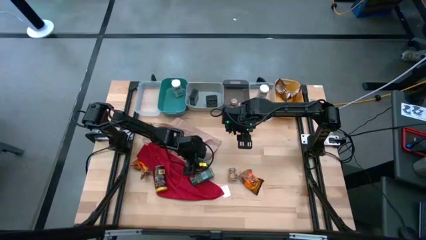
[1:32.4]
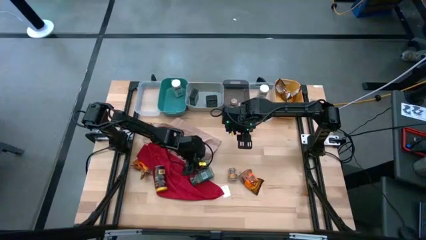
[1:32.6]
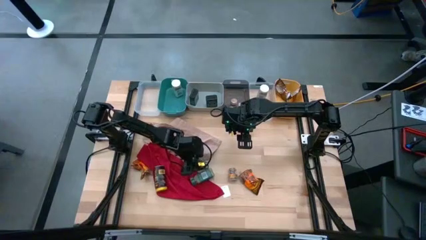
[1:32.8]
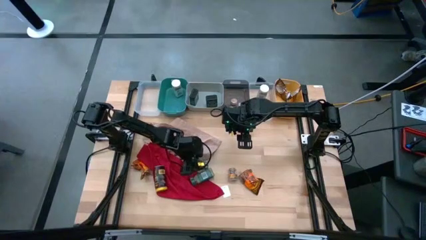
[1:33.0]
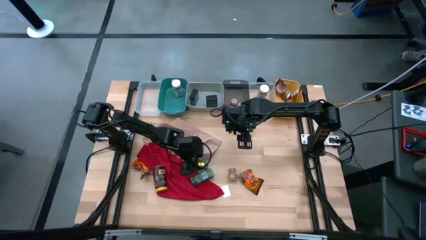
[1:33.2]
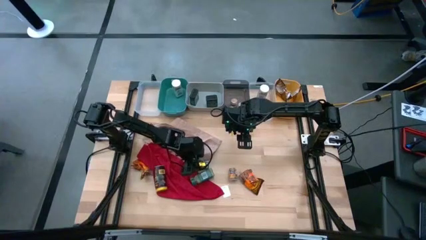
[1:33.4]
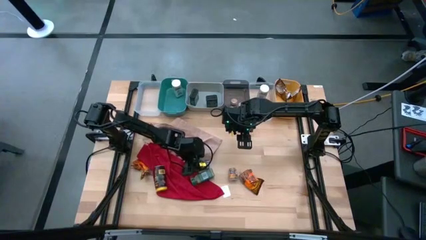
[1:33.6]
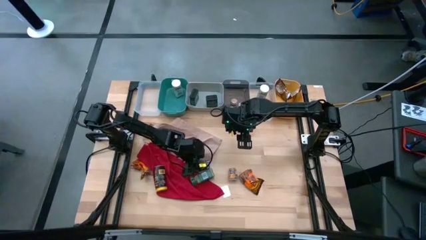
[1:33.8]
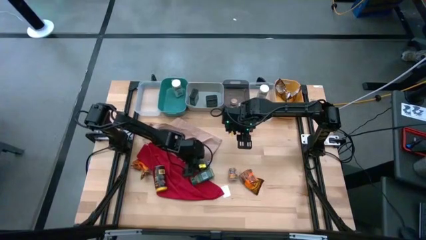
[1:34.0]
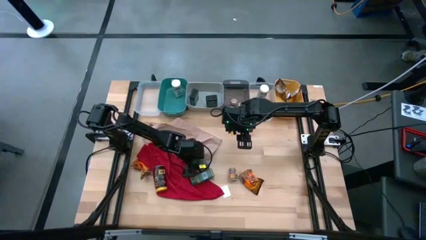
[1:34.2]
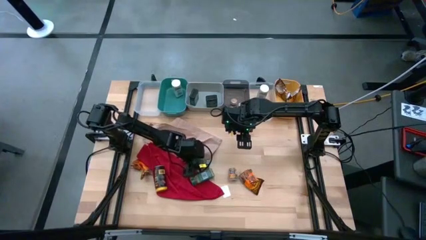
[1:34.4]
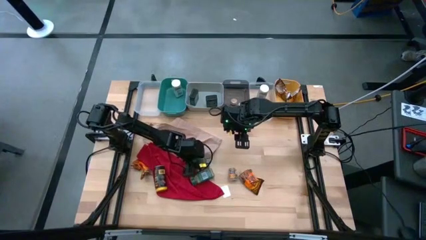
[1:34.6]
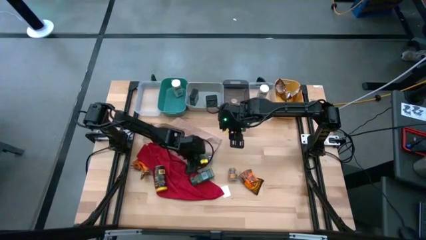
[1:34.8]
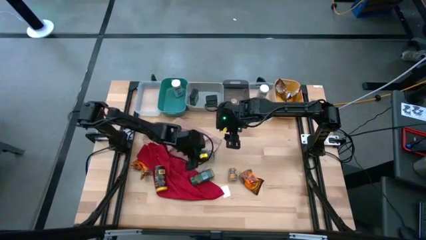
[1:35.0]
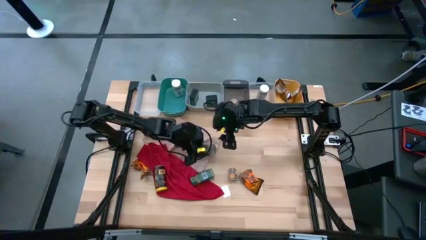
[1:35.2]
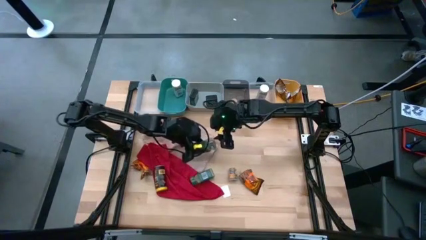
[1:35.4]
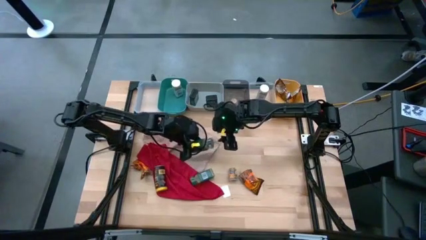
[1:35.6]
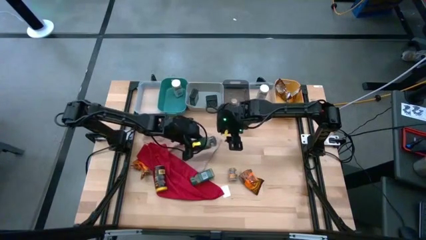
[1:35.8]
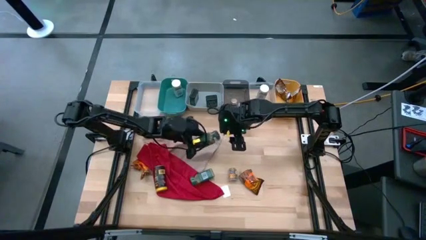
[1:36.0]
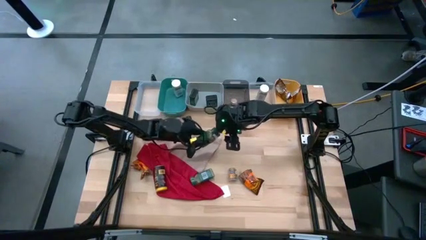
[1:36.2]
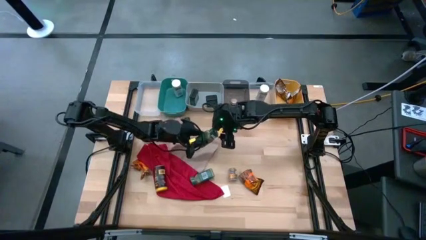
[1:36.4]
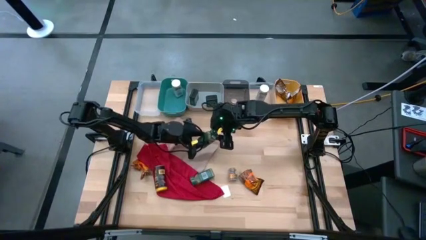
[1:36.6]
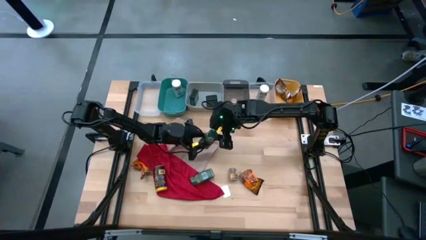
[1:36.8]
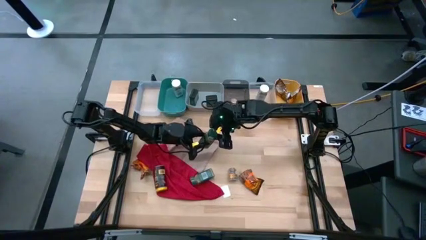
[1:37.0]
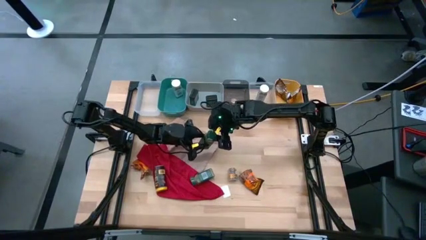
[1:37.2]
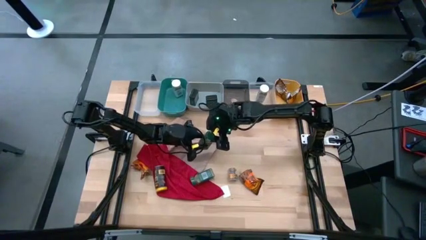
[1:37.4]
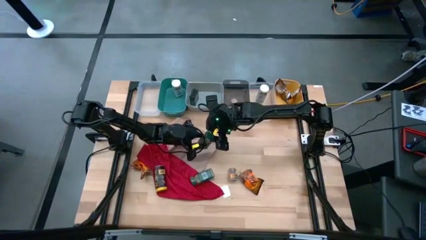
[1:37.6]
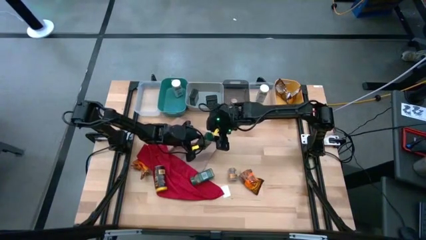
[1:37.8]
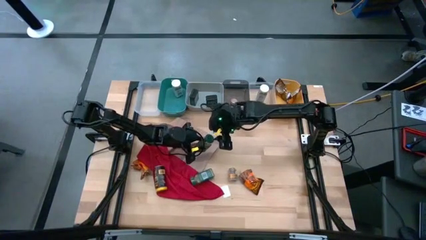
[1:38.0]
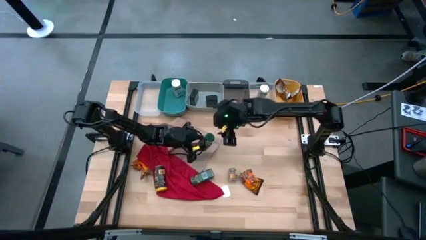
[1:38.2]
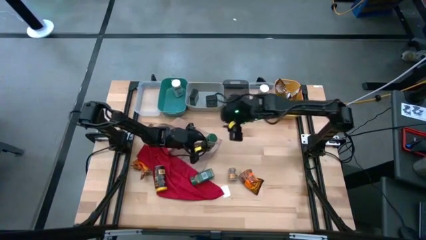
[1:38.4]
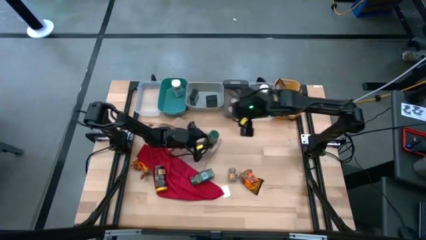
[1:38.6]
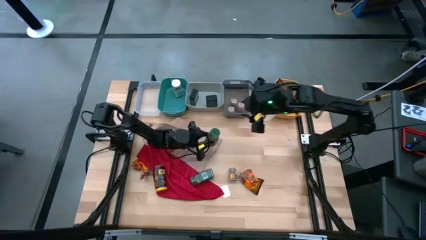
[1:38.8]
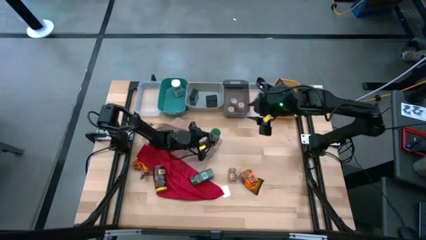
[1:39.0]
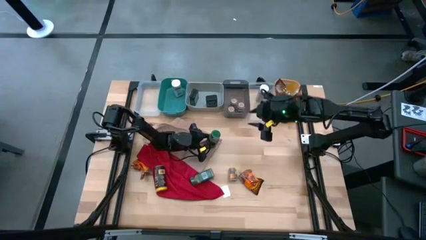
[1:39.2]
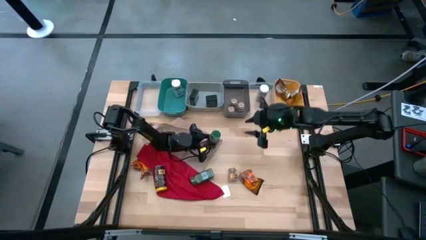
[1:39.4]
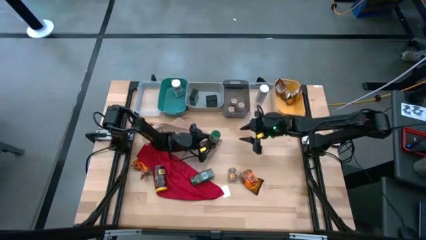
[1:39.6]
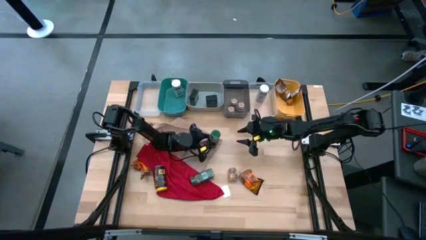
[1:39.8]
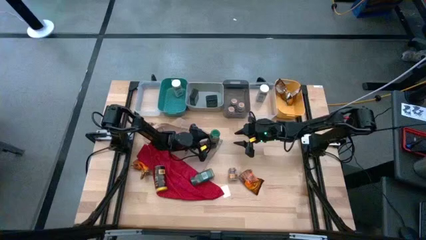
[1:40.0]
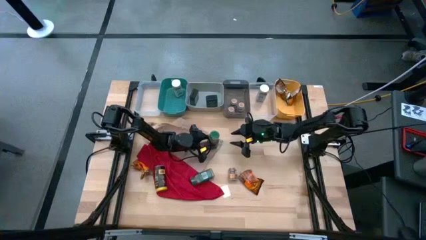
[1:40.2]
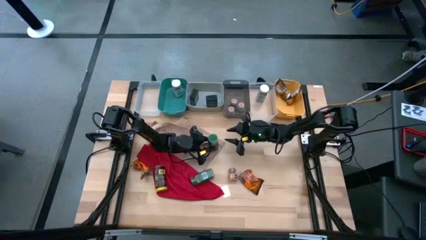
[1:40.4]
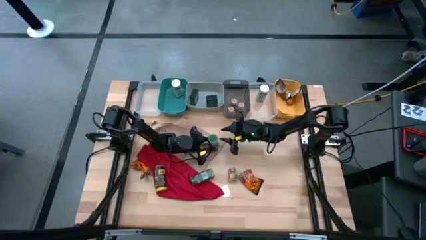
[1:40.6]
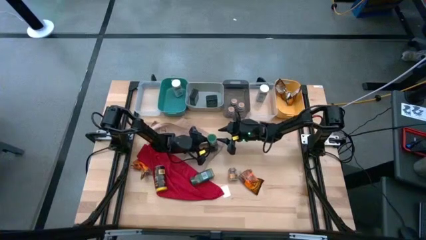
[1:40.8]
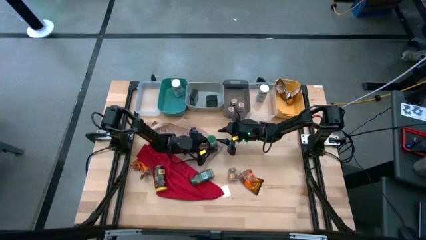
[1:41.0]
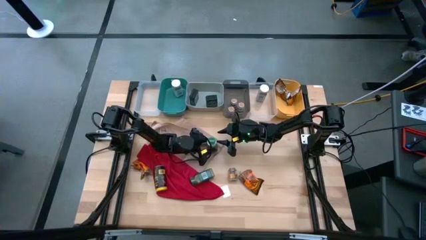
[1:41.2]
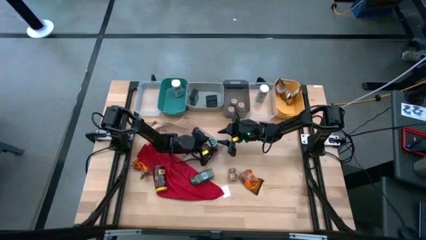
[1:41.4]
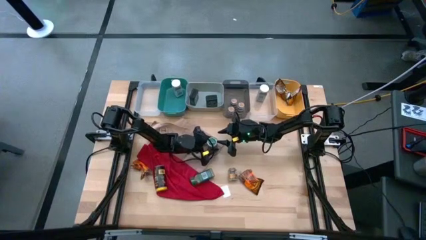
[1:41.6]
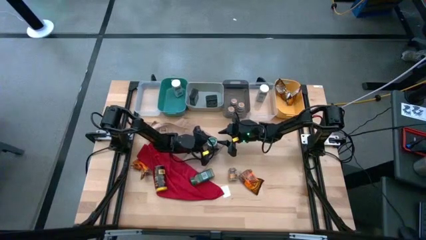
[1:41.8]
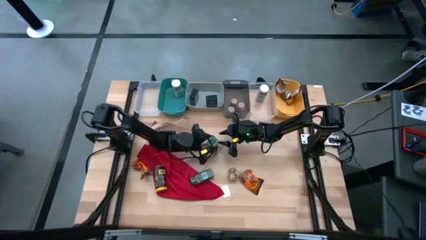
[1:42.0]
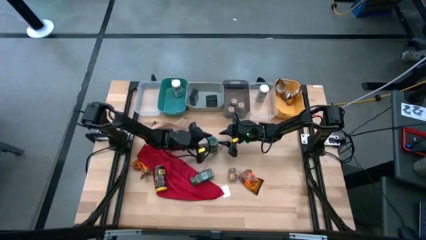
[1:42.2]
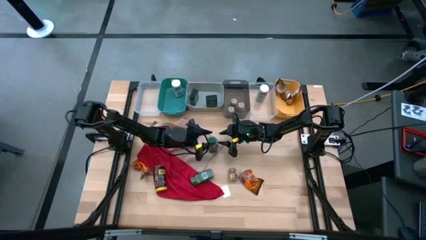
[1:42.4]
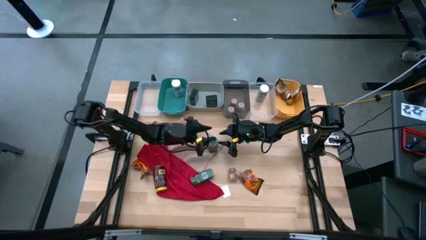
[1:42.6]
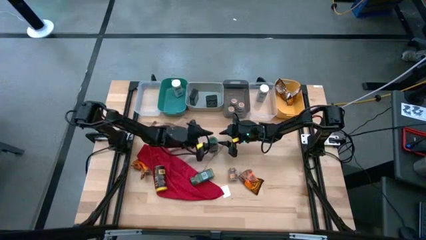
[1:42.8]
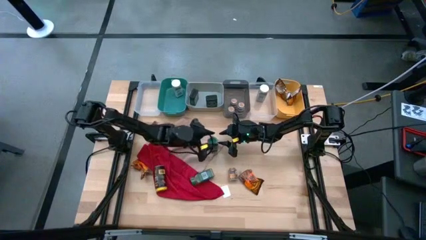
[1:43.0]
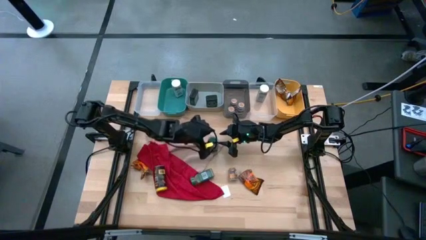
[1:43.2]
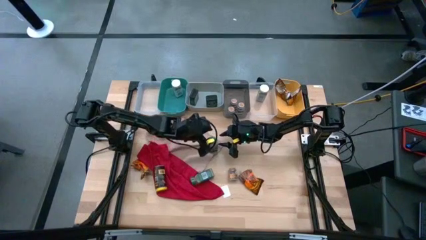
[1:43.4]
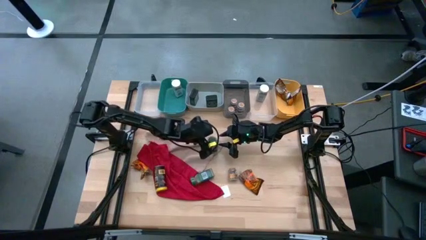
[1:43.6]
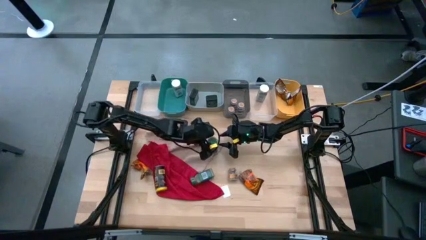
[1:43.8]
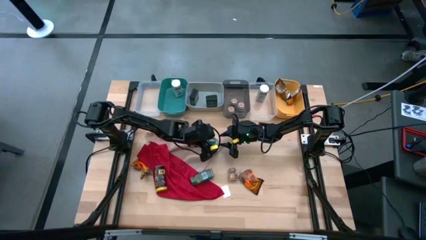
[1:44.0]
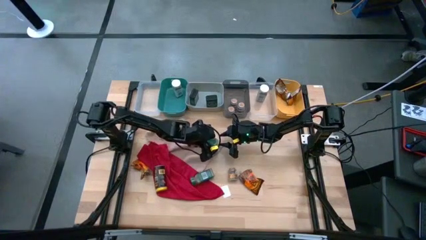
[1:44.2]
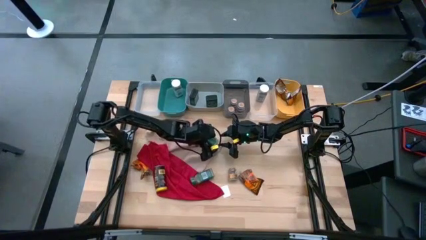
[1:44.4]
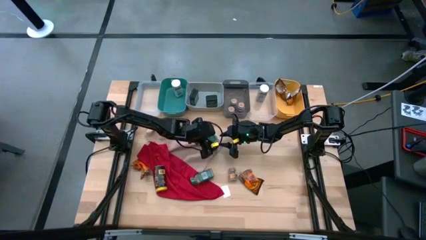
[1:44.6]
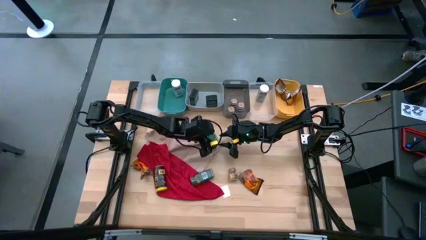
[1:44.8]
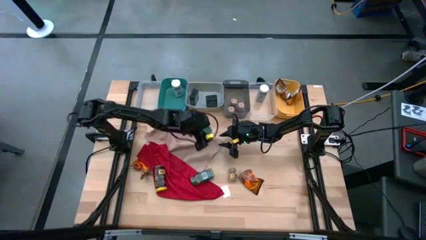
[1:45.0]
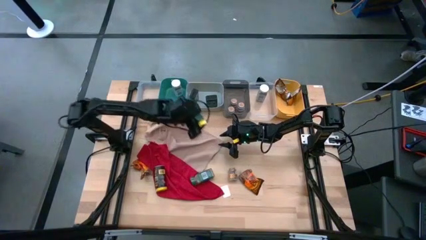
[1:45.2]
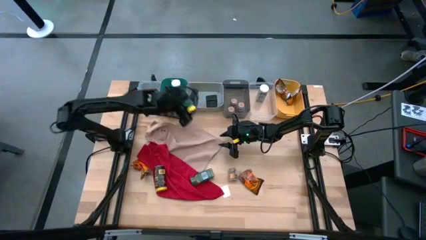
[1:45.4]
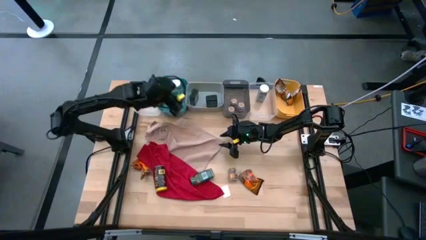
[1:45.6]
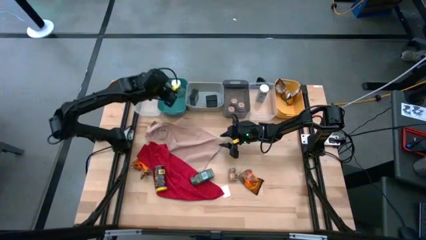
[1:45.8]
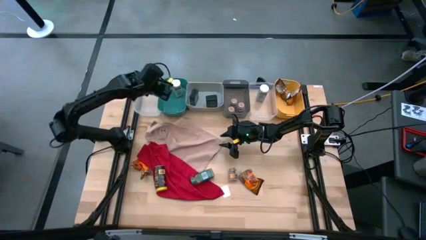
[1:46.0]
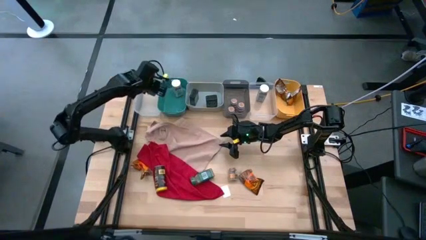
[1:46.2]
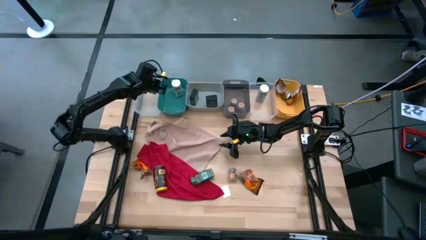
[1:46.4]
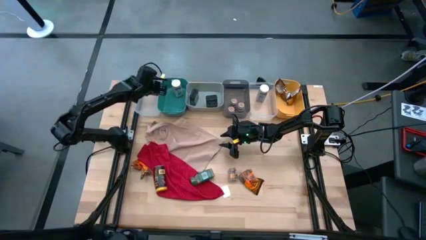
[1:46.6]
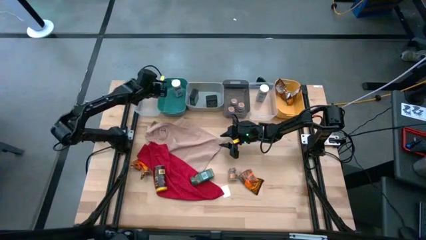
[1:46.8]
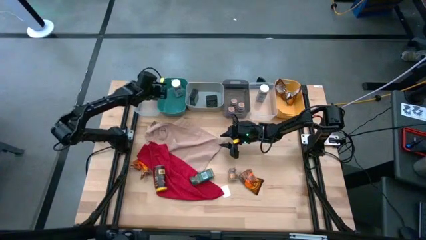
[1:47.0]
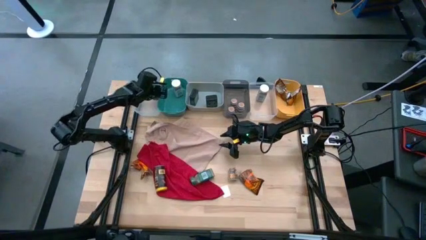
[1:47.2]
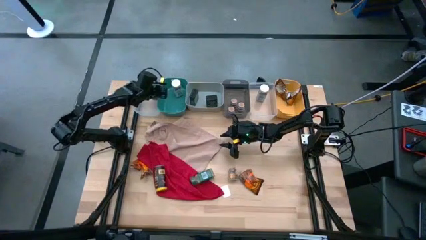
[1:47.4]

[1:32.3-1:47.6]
Task: Sort spices by type
Put the green seasoning bottle into the blue transparent bin

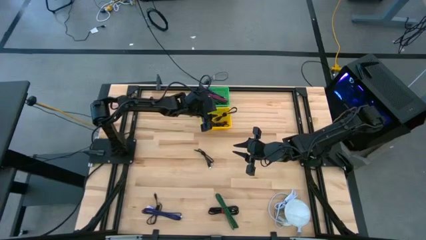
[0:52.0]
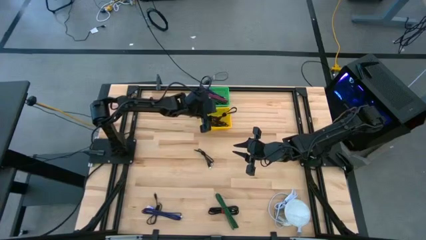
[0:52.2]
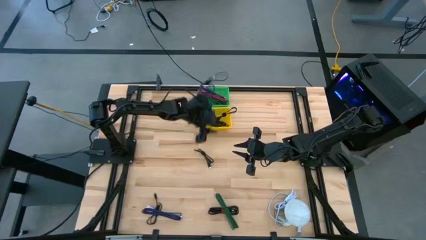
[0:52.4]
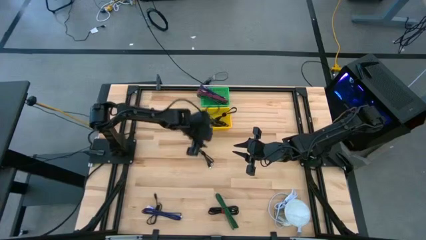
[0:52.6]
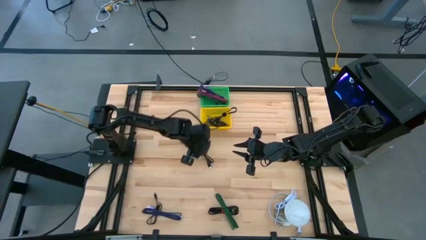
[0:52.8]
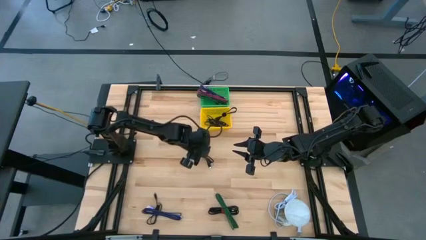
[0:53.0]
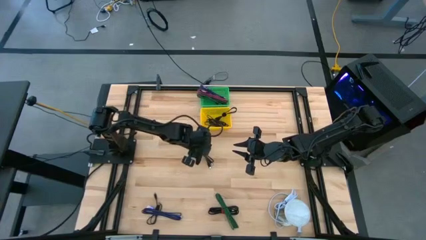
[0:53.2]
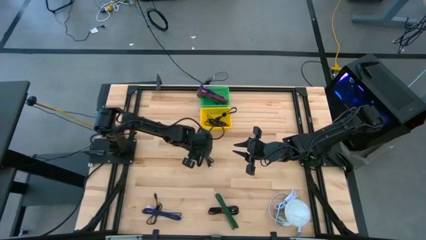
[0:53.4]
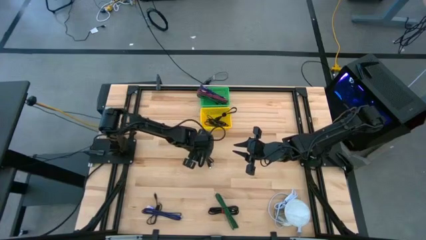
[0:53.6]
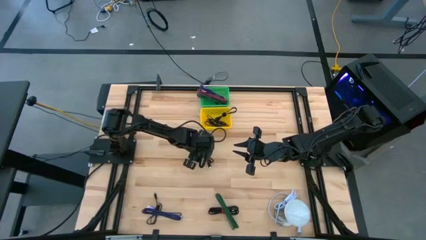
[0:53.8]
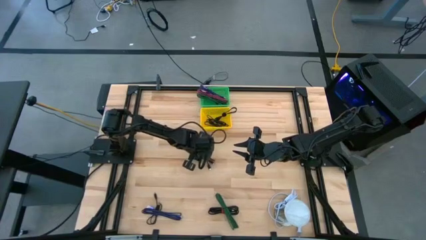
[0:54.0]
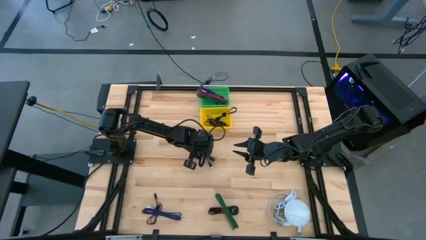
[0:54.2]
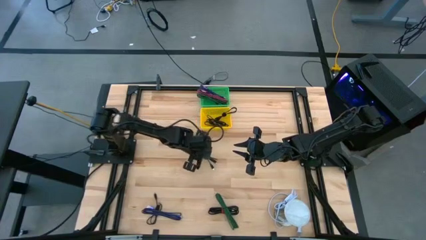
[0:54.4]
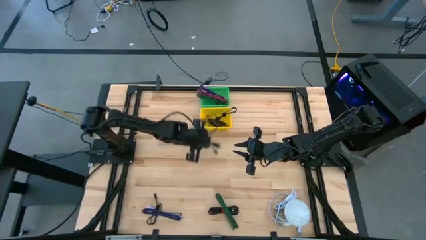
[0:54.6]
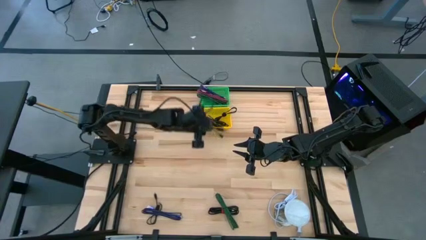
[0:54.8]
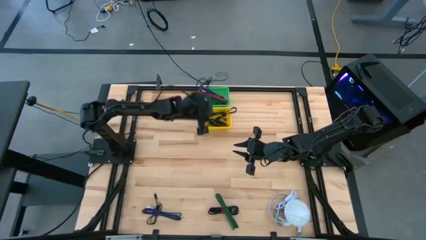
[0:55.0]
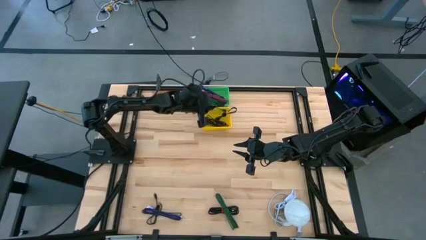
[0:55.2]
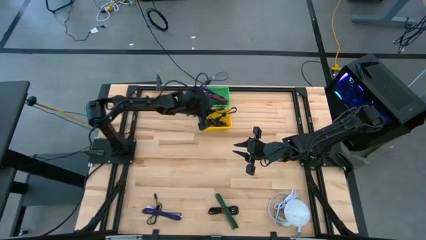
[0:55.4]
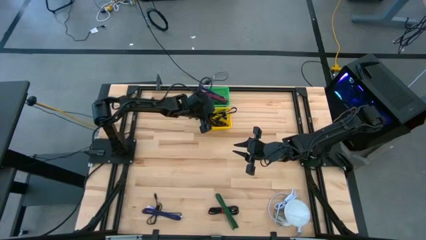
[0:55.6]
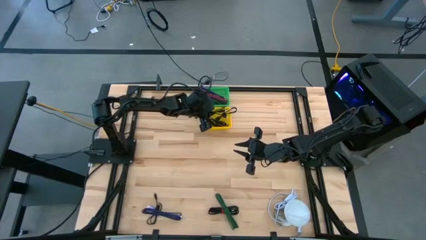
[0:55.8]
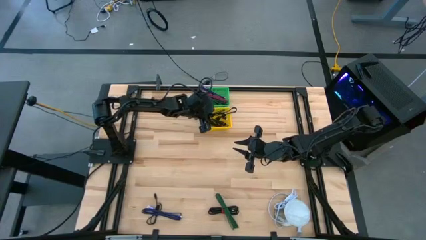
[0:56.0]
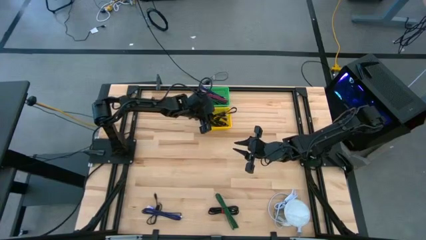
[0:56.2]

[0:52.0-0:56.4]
Task: Pick & Place USB Port
Put the middle black charger cable into the yellow basket
